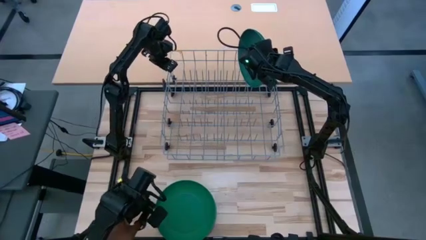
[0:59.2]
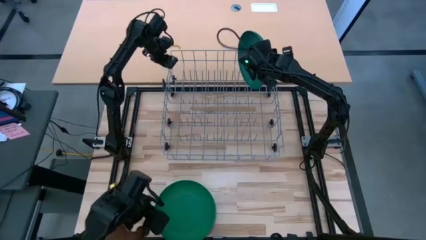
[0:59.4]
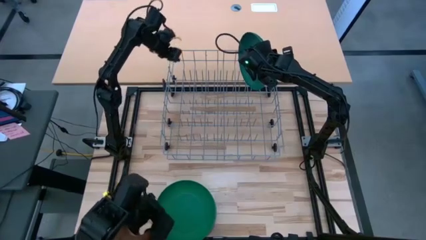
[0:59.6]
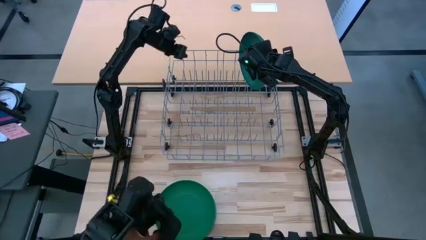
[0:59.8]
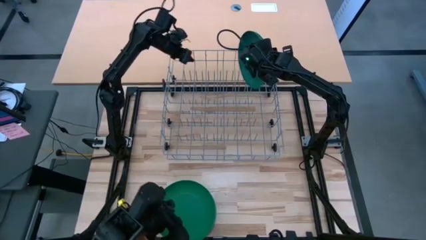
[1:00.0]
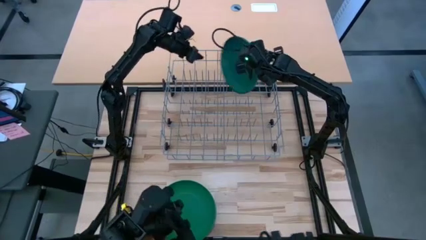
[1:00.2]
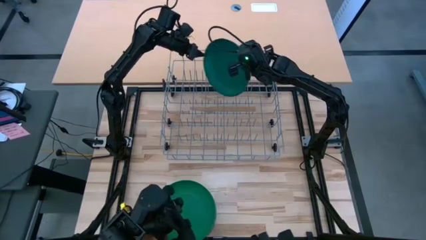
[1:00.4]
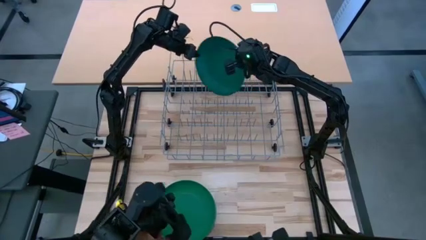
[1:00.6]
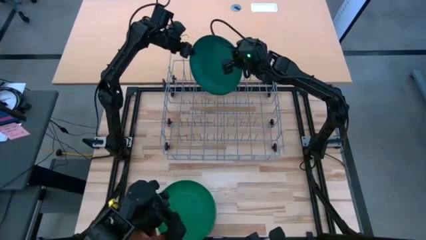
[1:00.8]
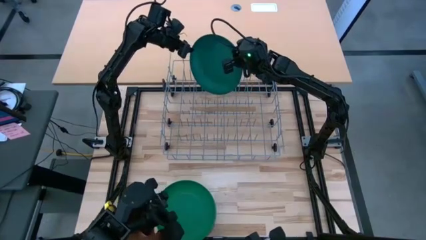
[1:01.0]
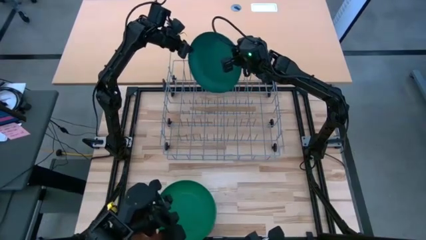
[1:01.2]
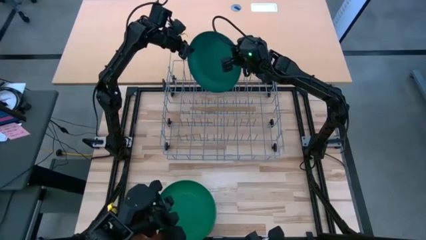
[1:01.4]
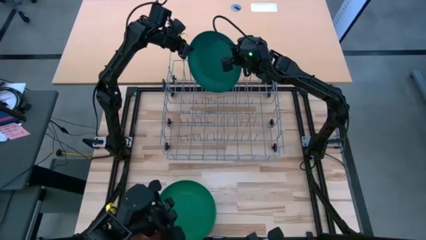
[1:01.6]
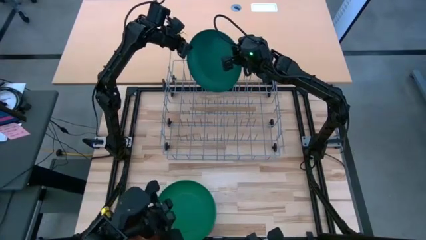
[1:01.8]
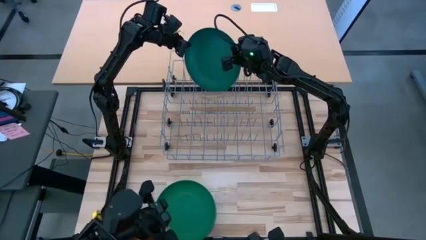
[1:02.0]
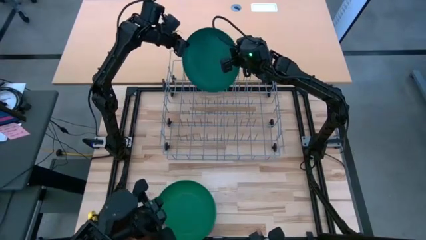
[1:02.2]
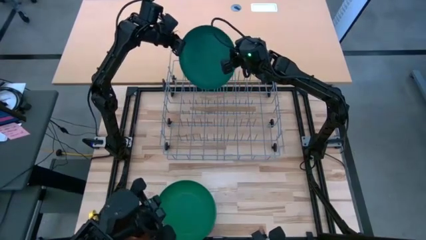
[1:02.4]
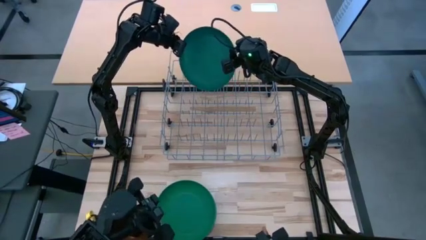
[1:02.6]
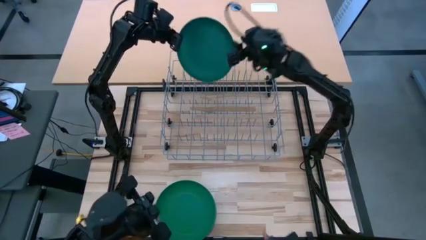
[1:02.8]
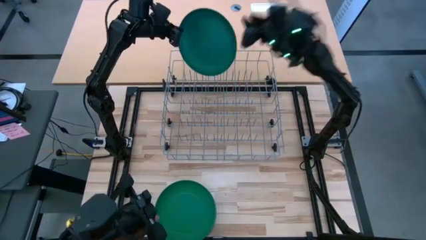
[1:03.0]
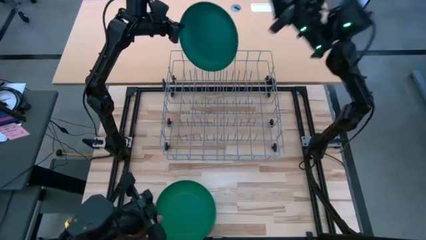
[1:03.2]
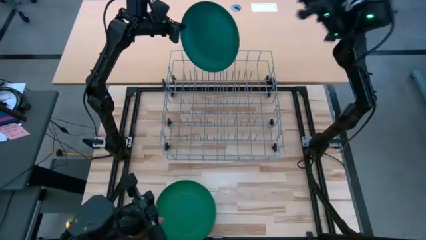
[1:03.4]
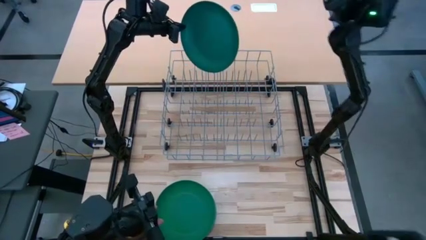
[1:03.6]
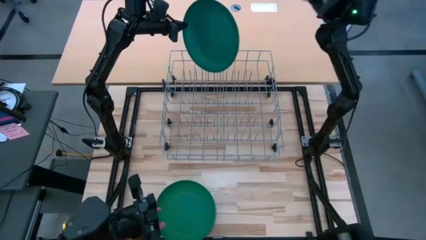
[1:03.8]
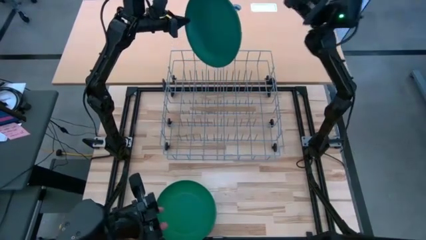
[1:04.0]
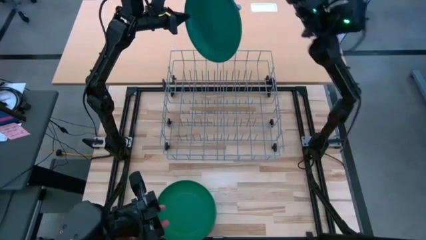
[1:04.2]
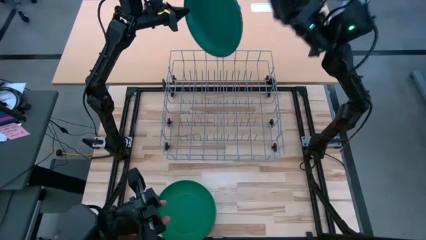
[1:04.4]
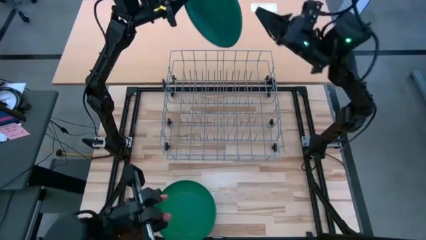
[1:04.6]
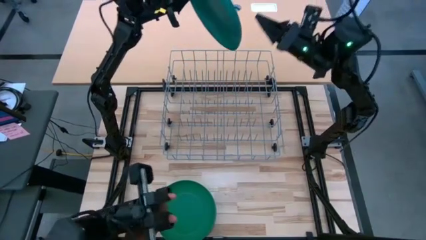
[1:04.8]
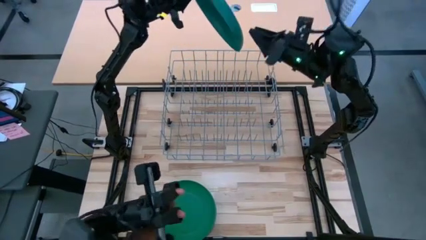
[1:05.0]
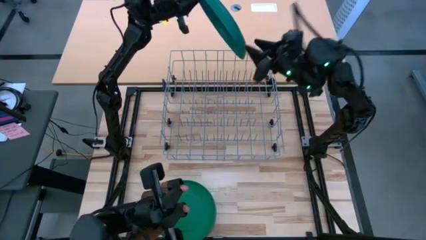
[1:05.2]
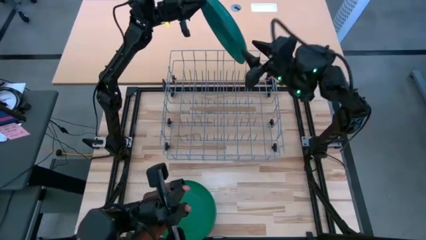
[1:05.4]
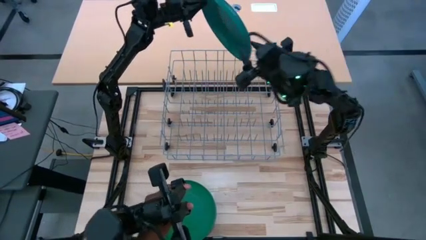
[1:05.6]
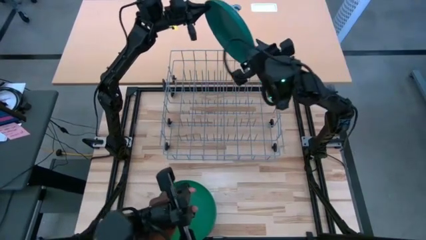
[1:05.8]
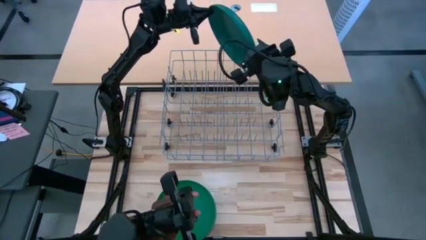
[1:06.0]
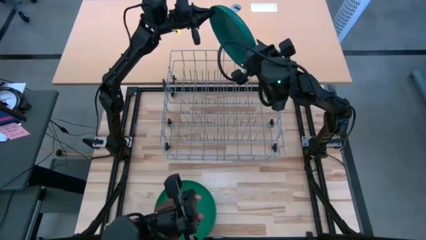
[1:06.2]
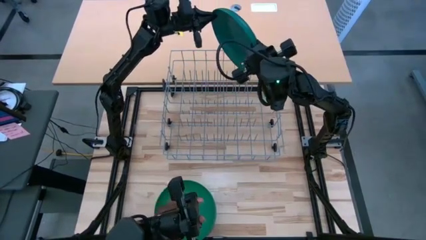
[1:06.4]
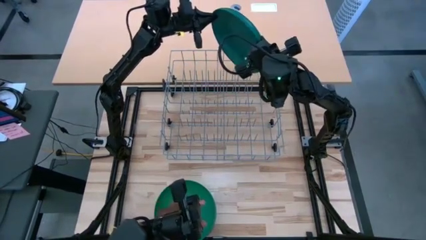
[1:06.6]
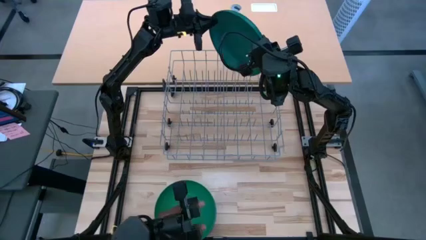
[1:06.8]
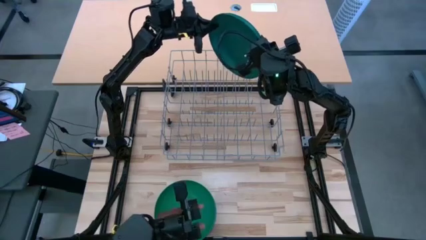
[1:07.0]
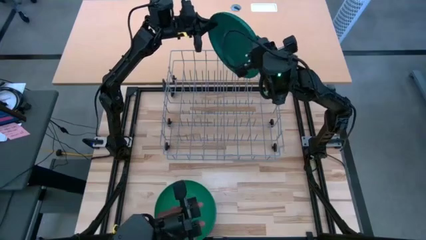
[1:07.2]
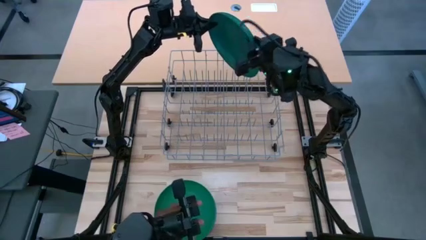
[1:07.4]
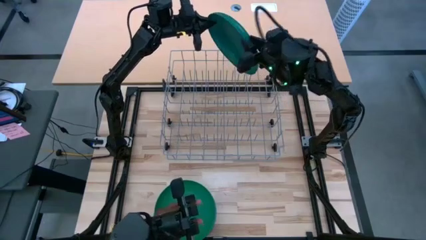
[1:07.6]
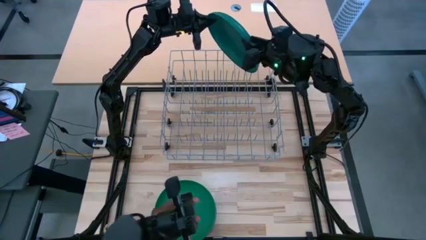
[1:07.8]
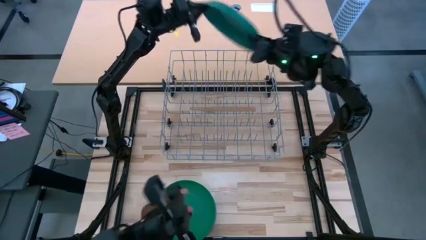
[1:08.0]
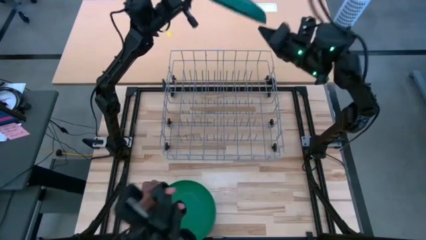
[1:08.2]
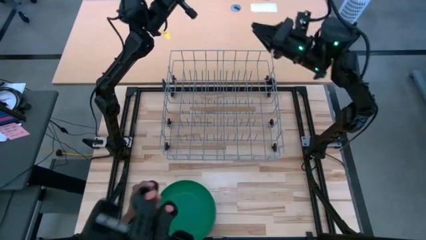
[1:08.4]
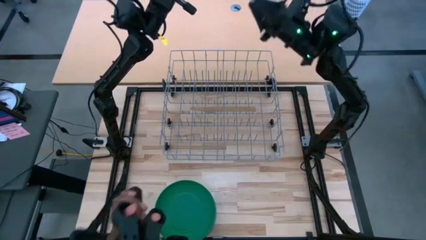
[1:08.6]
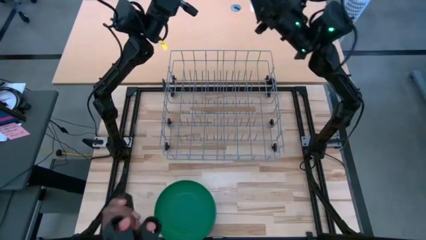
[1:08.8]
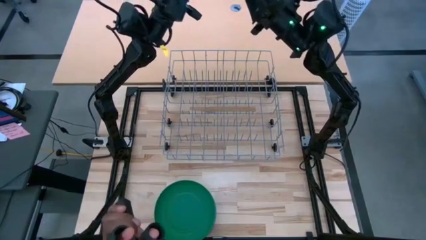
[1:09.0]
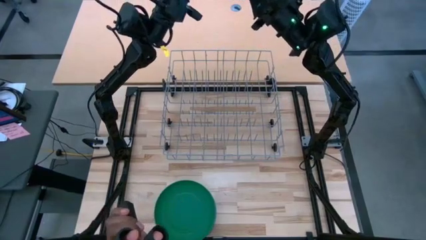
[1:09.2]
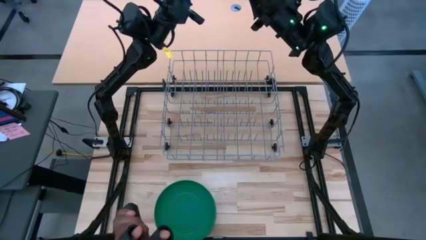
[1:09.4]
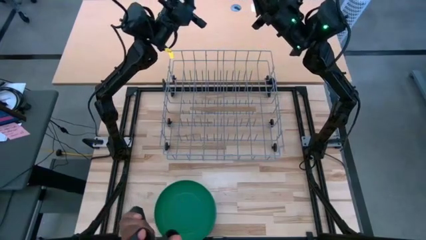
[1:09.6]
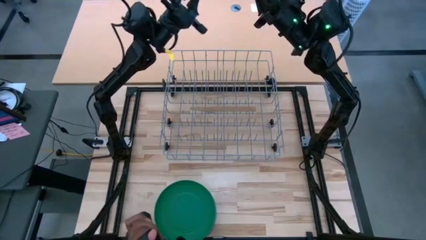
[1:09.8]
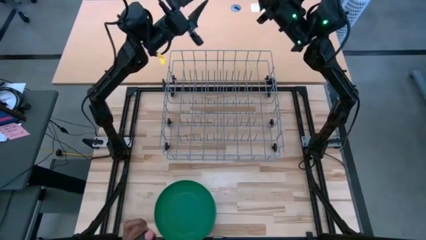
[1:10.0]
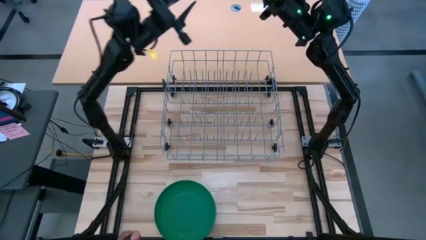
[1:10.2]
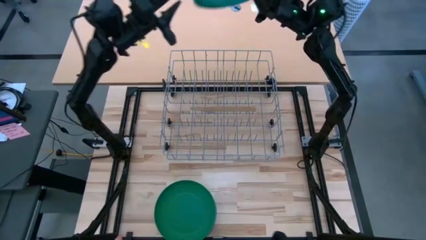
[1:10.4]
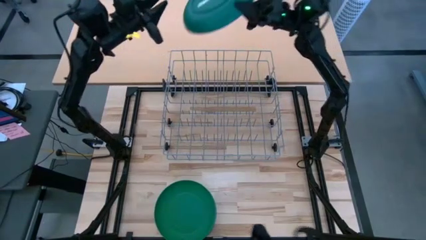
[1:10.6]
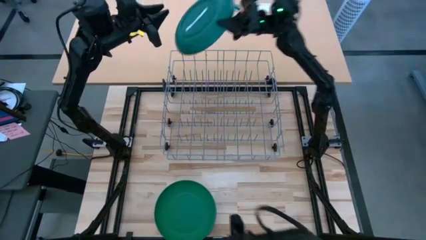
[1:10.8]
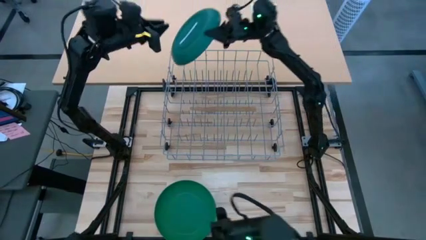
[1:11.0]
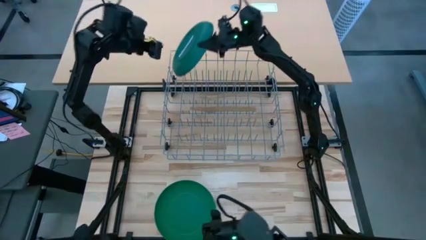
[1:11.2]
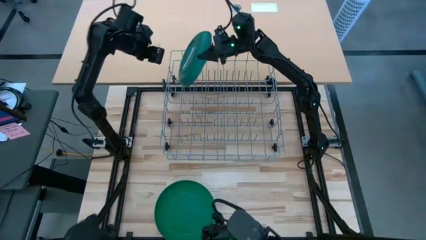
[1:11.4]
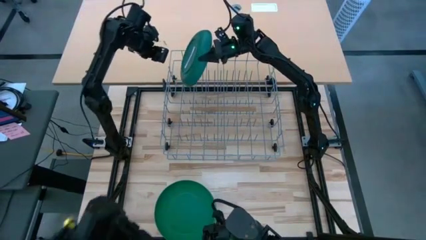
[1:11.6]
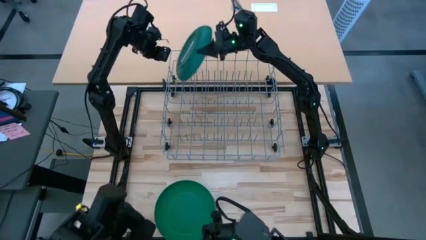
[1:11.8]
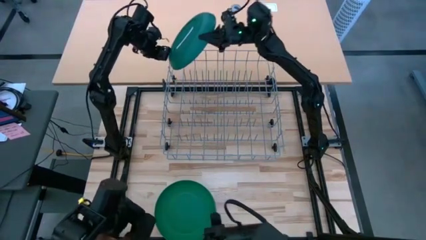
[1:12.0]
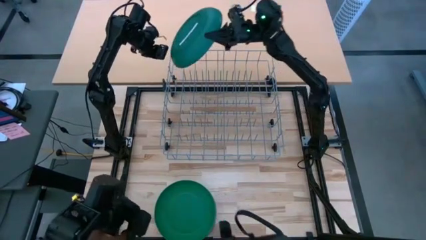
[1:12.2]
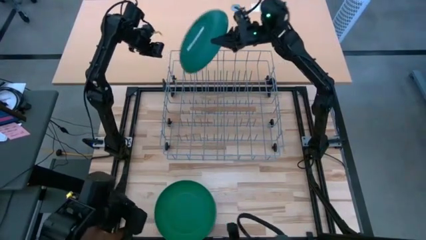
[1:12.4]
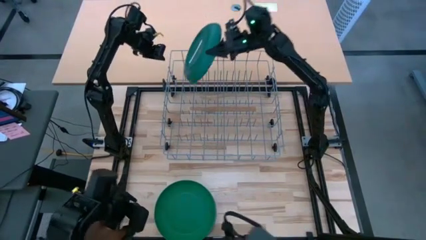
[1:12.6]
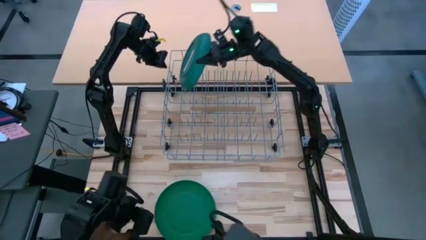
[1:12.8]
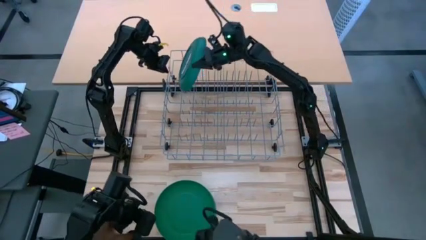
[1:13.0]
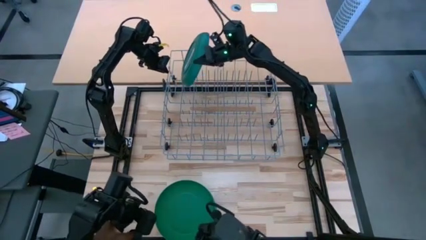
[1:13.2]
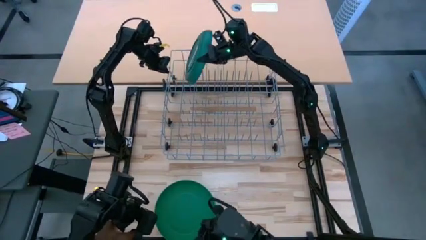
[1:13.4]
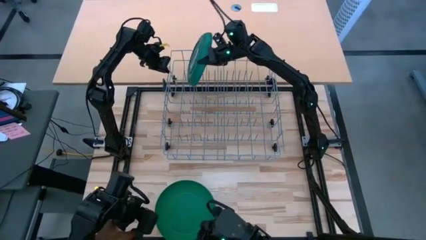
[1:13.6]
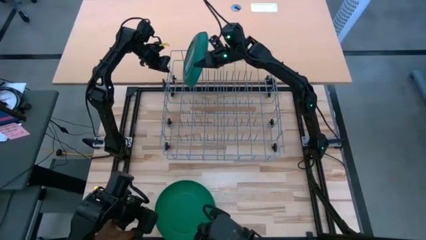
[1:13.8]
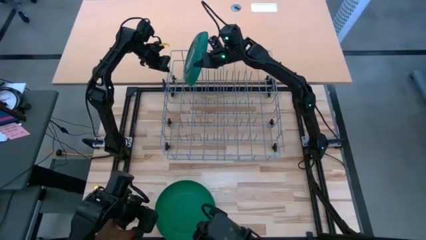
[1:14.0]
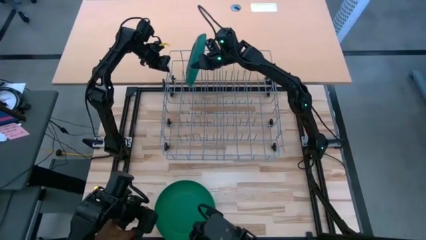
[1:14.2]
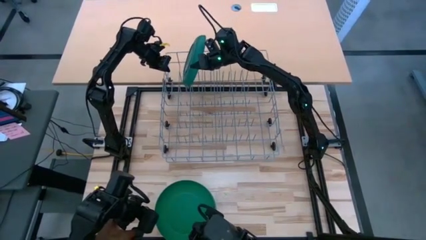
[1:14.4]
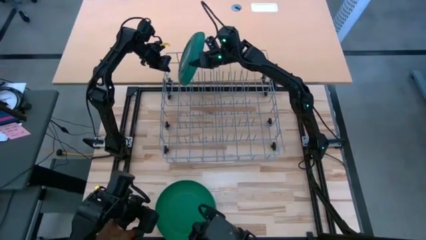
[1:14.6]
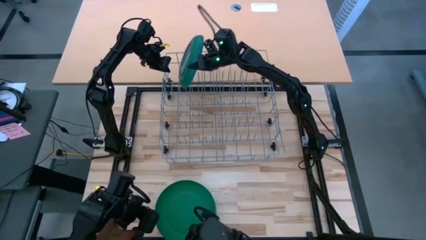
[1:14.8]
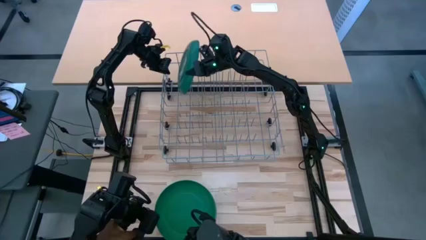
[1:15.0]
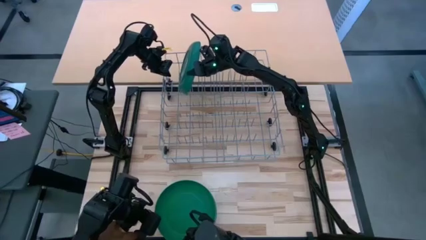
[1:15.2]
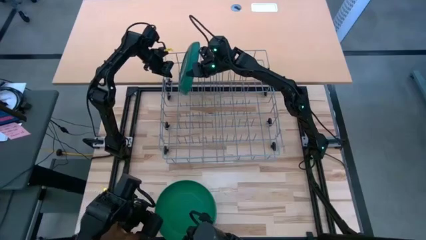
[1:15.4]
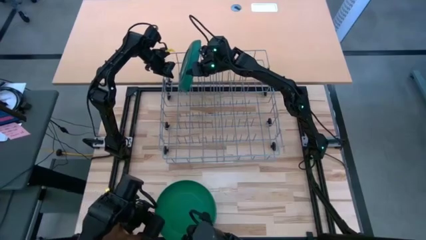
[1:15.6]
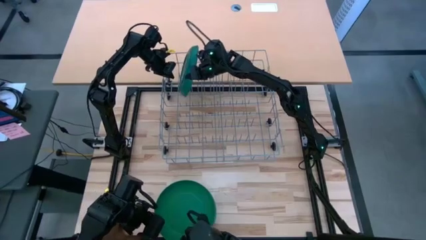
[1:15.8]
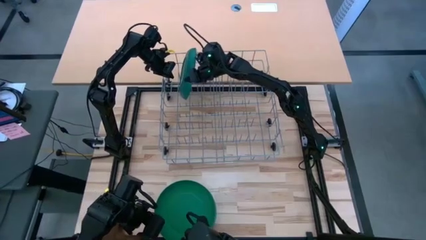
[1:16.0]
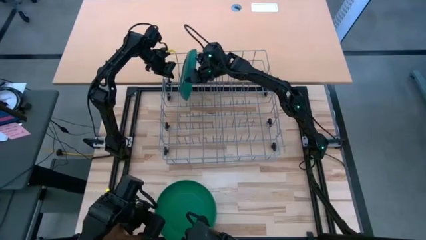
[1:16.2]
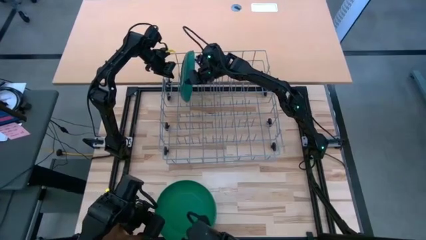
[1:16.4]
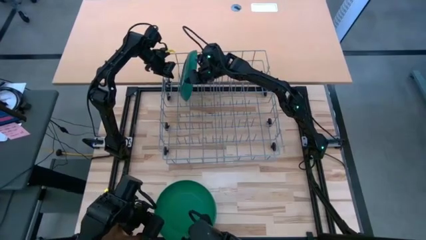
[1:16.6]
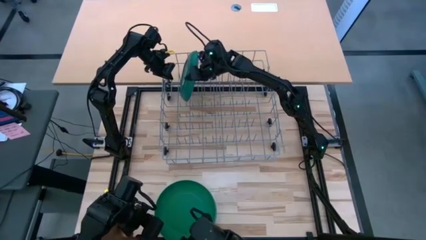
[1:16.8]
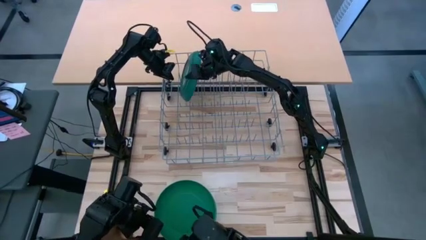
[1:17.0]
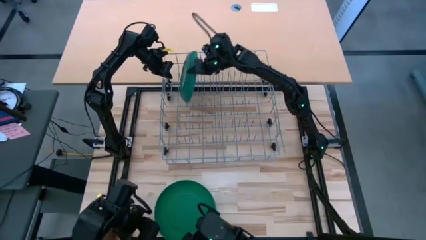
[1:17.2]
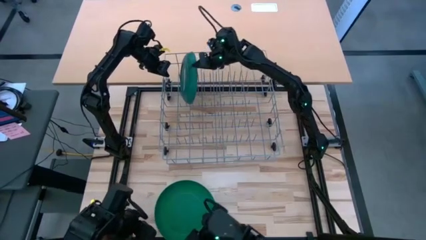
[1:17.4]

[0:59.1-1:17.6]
Task: Sort dishes
Put the dark blue plate in the dish rack
